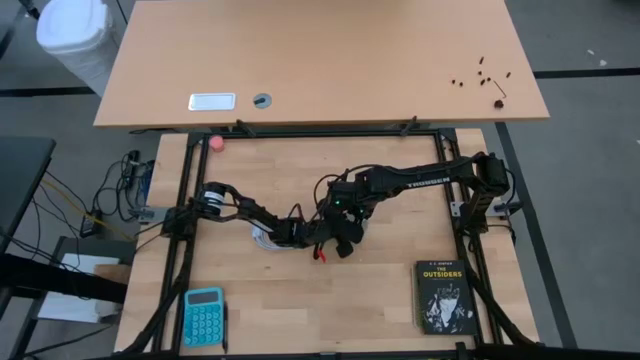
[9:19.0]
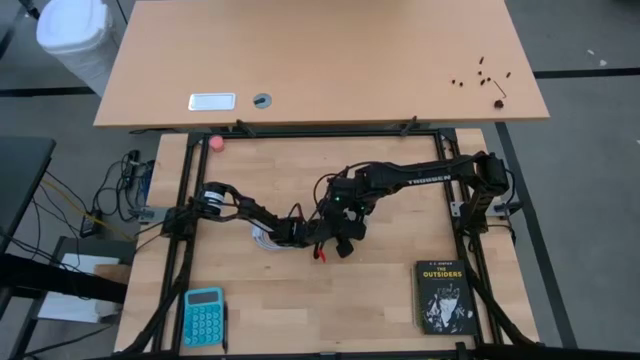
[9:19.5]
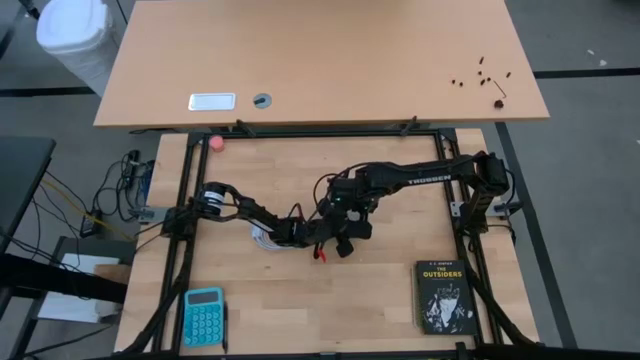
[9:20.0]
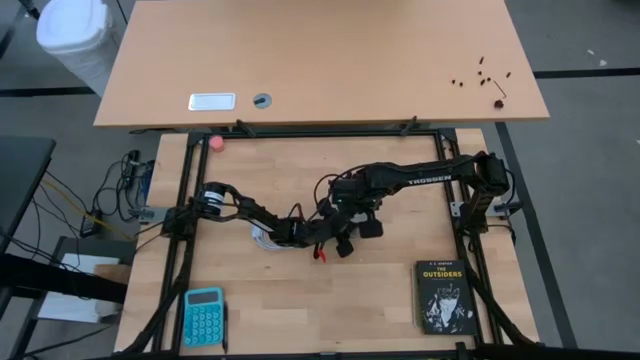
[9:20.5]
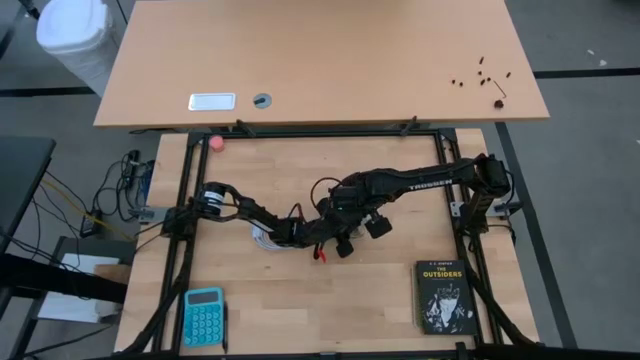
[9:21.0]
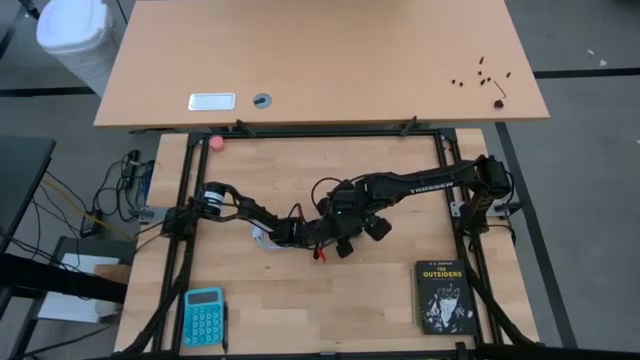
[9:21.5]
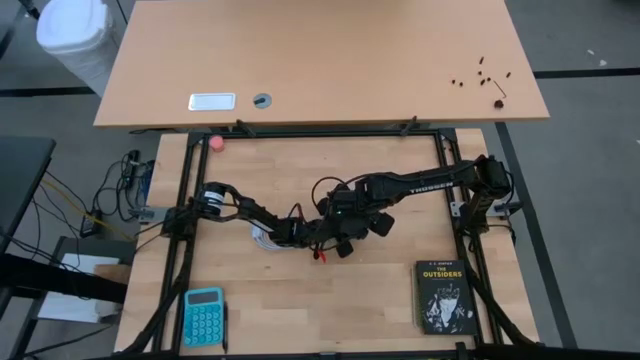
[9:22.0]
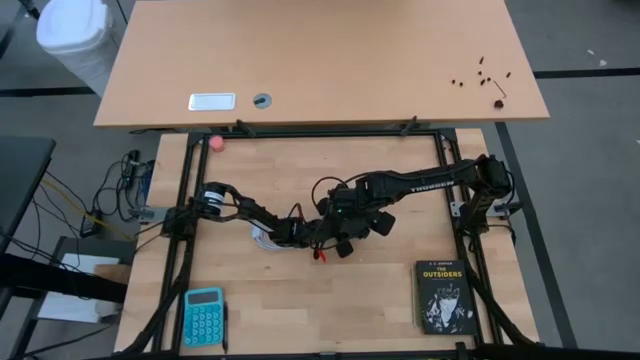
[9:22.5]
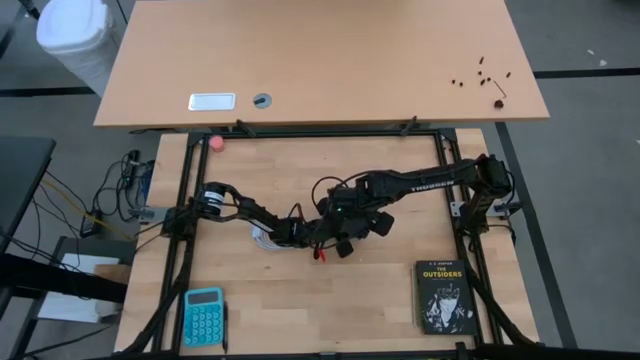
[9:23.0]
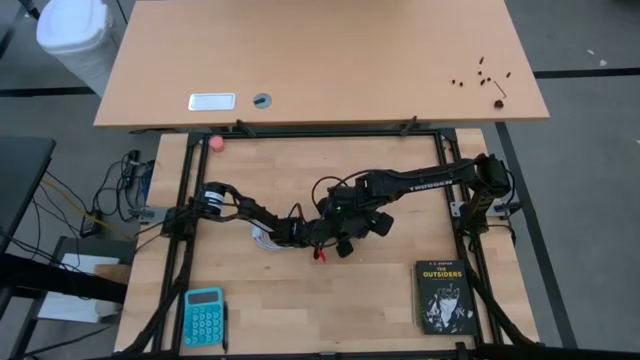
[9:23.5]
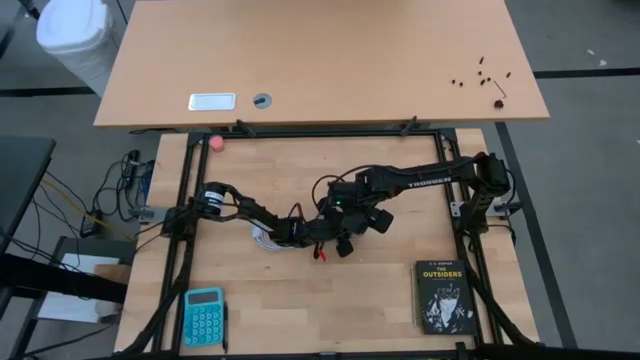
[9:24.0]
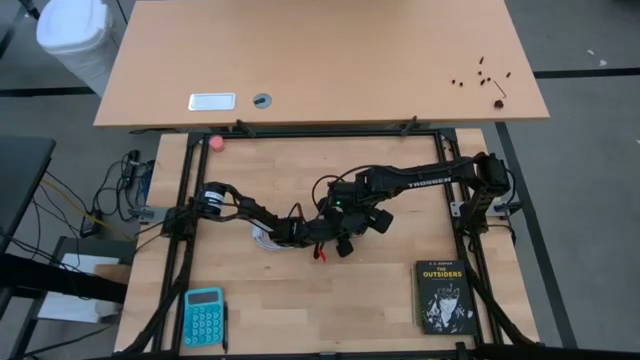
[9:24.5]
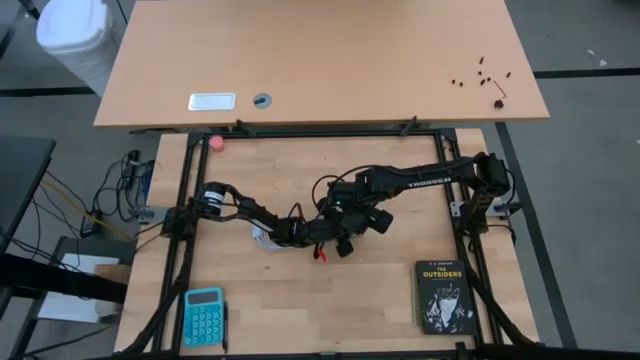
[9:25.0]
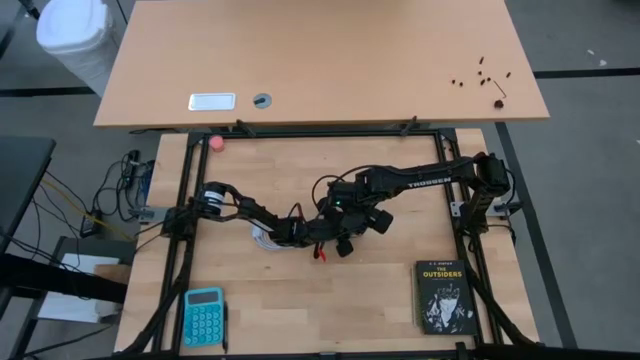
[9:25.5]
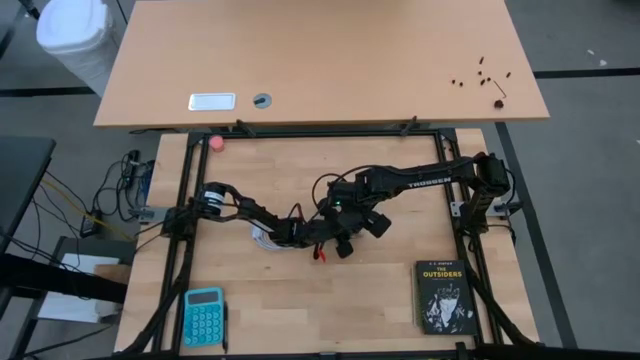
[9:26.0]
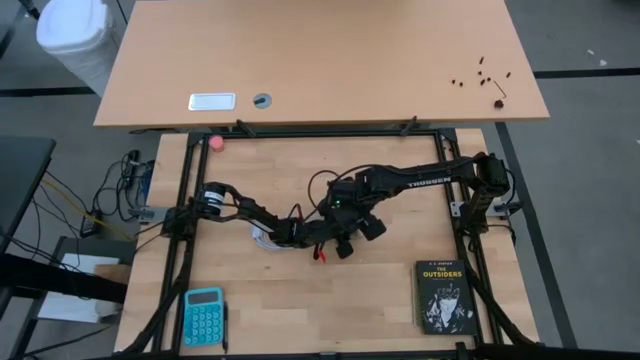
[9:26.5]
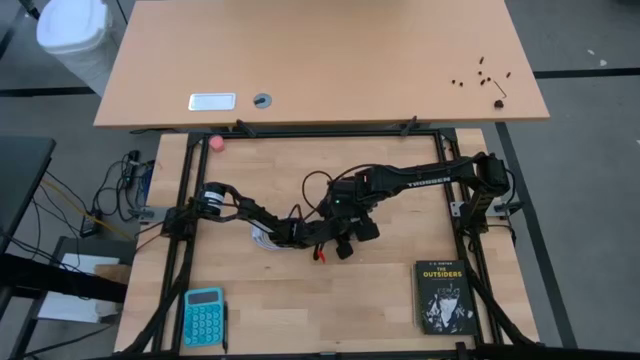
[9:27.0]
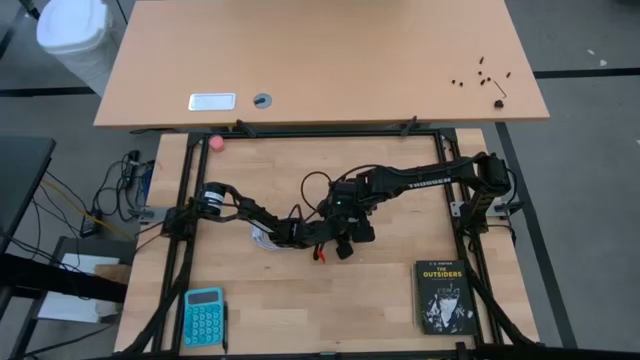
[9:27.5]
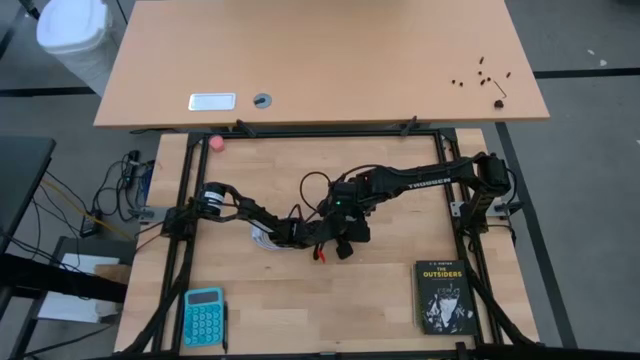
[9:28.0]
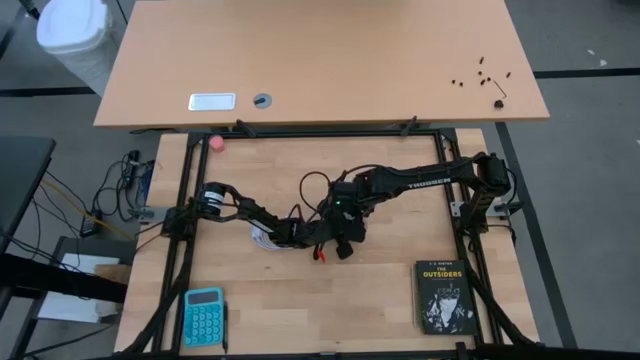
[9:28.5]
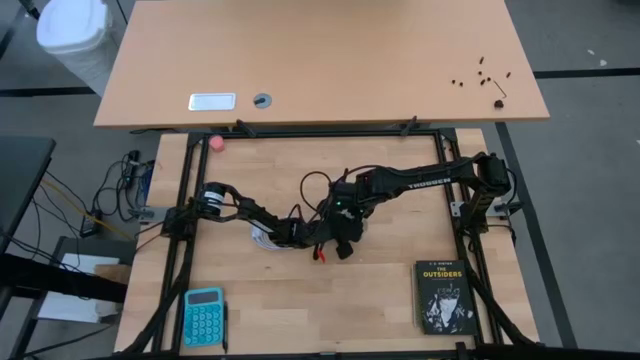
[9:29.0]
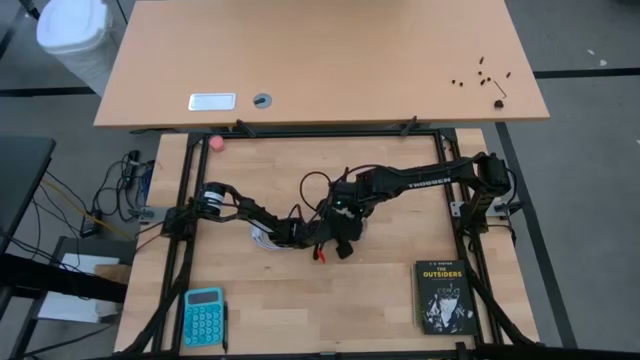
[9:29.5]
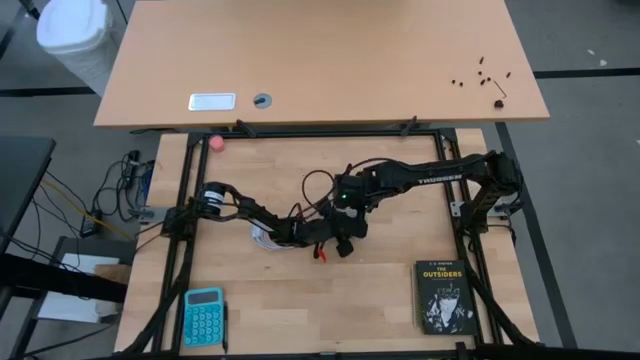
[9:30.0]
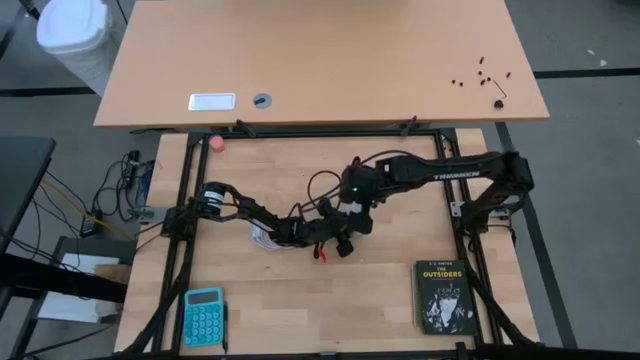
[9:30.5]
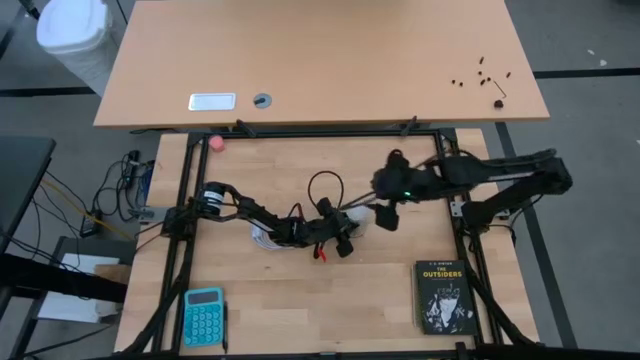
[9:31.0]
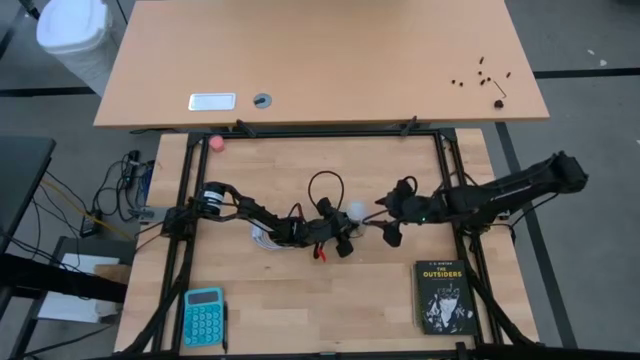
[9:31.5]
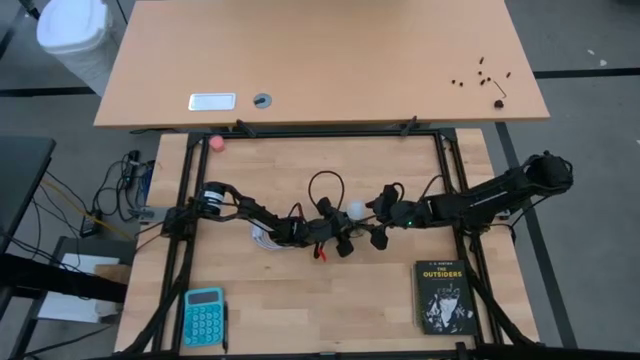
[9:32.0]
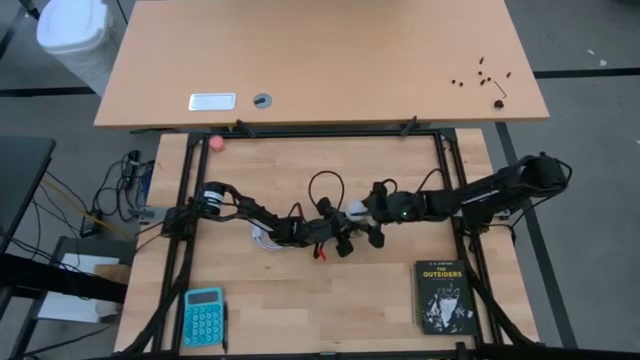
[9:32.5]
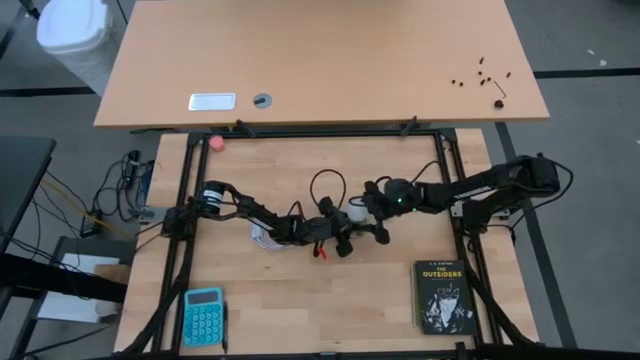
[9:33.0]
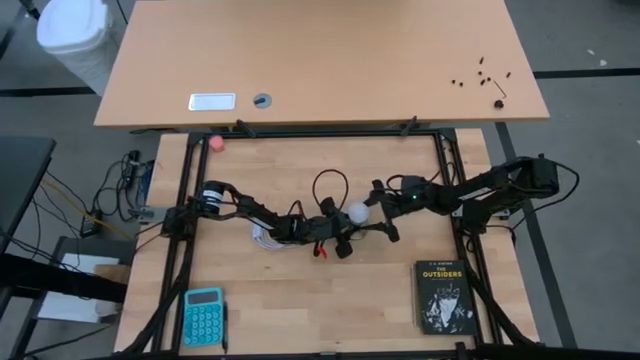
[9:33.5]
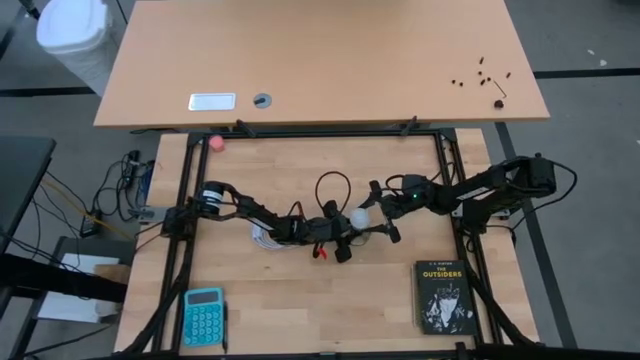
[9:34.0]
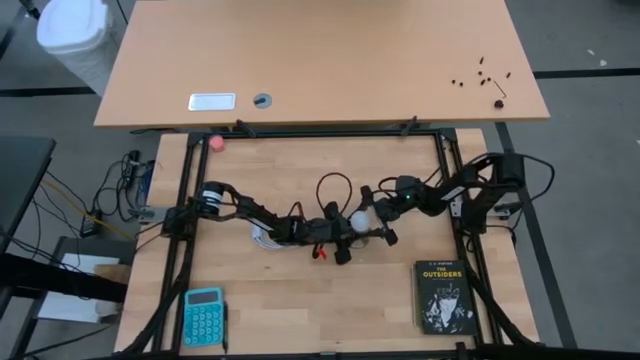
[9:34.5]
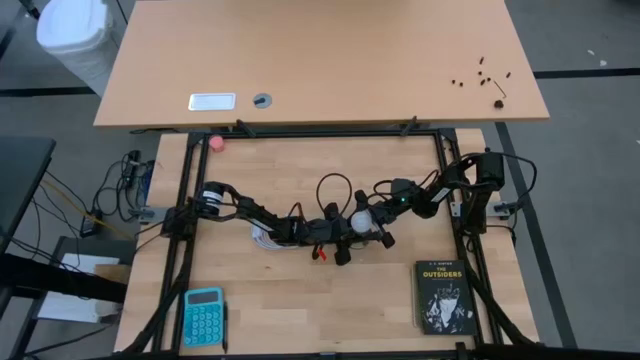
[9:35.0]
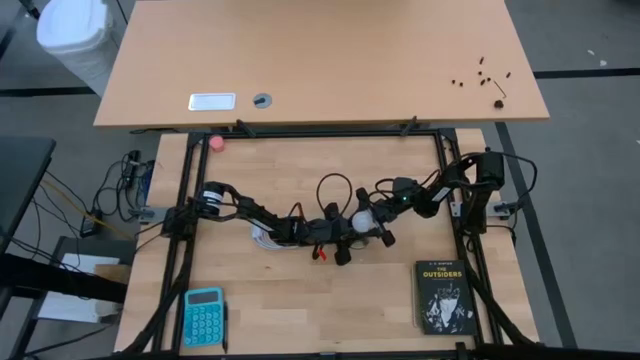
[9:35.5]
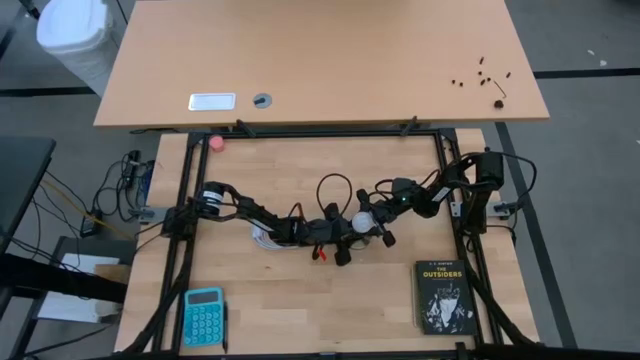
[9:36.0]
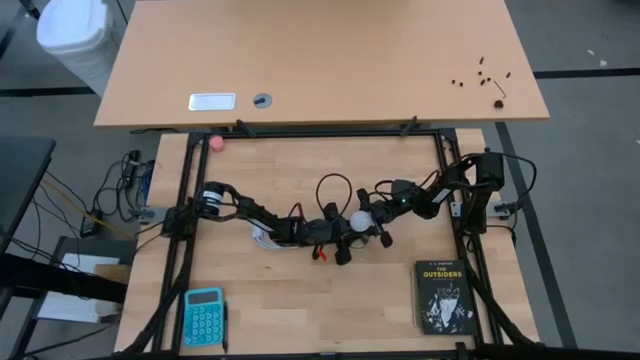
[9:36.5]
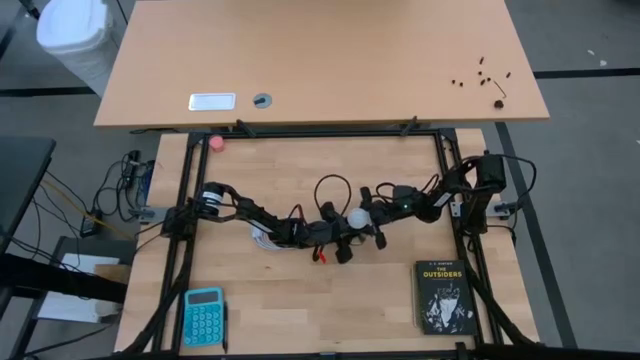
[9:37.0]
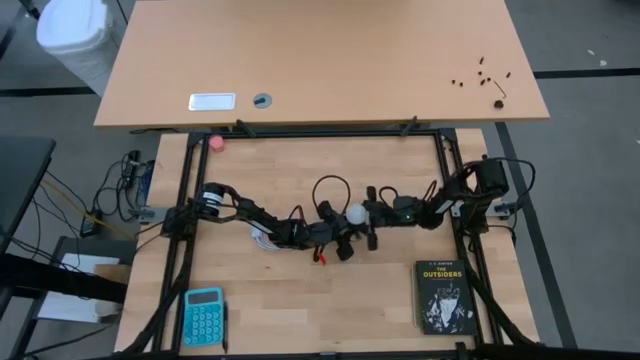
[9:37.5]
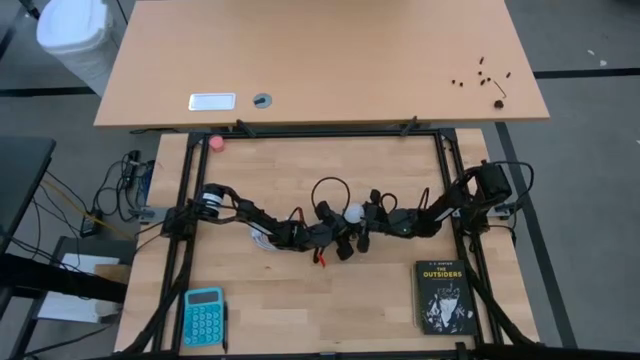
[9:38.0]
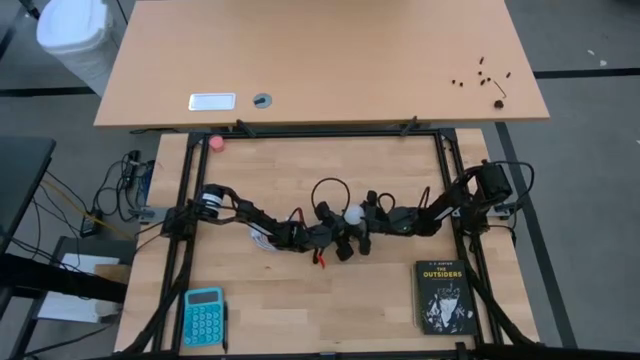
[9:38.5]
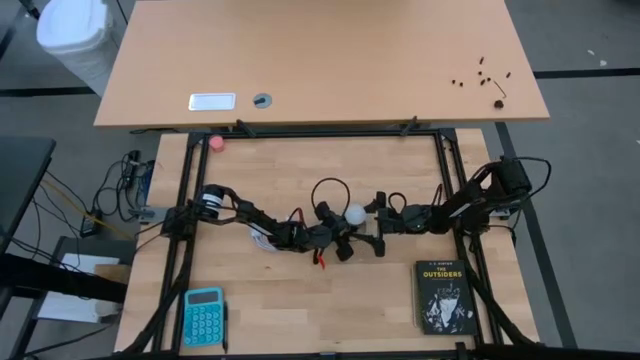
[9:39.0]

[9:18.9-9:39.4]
Task: Screw lightbulb
Insert the white lightbulb into the silver lamp
